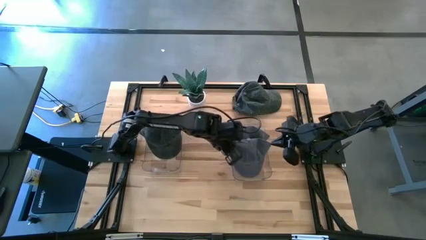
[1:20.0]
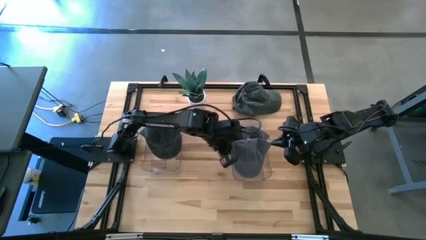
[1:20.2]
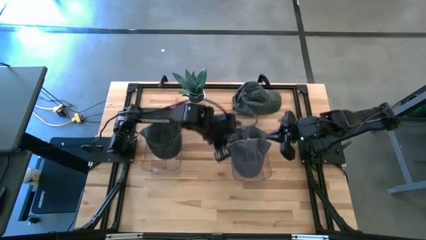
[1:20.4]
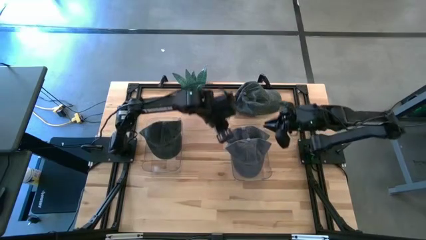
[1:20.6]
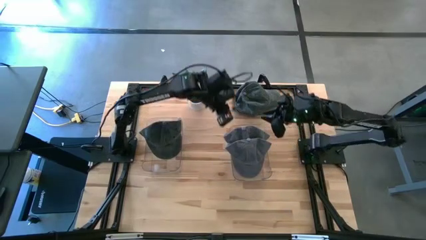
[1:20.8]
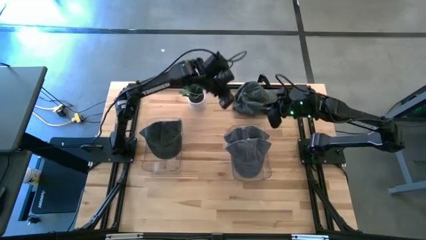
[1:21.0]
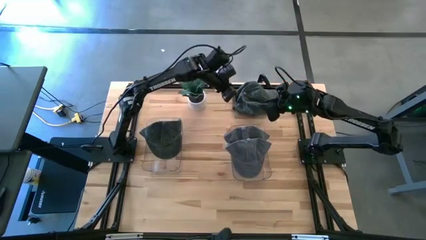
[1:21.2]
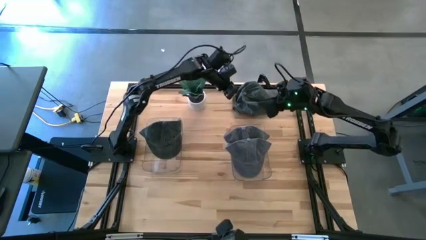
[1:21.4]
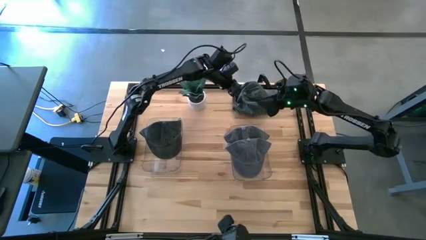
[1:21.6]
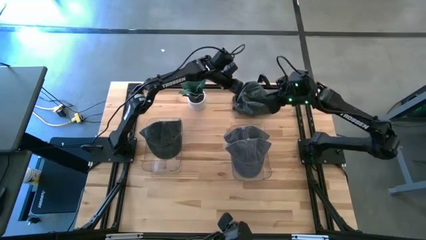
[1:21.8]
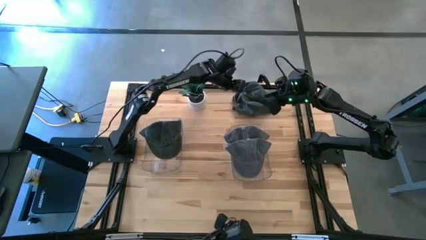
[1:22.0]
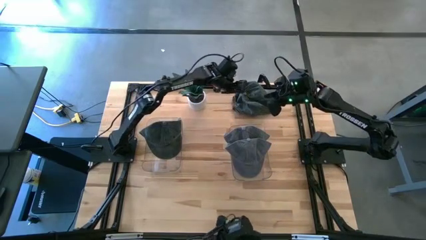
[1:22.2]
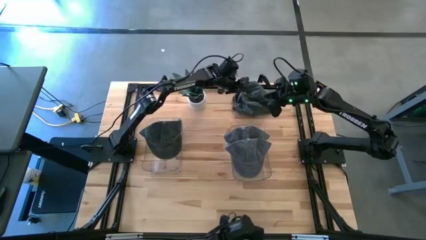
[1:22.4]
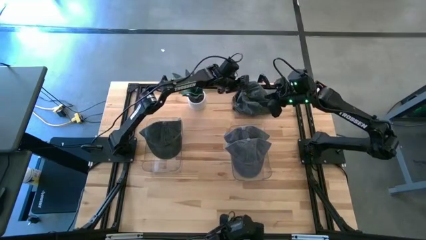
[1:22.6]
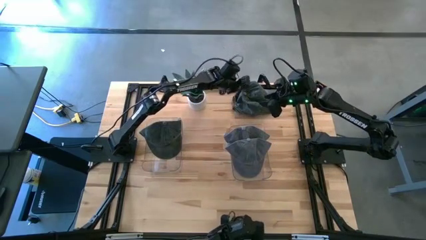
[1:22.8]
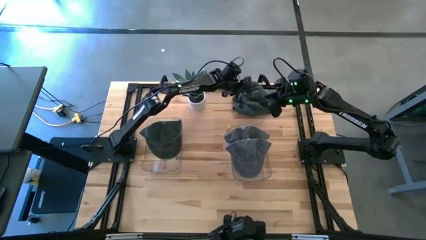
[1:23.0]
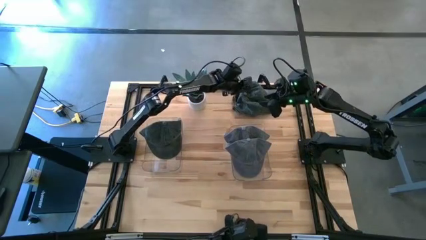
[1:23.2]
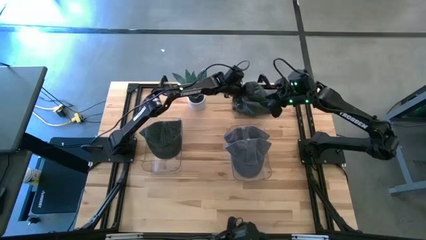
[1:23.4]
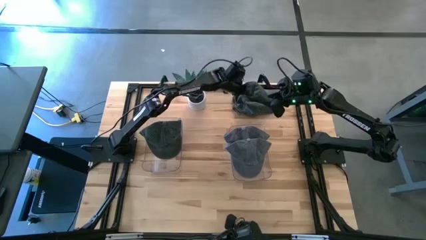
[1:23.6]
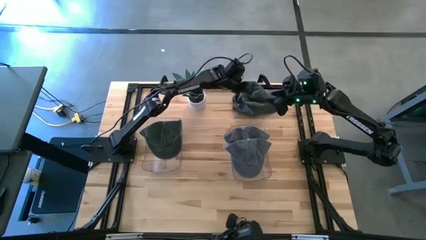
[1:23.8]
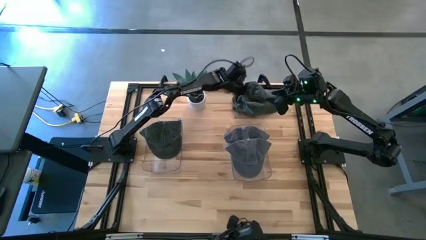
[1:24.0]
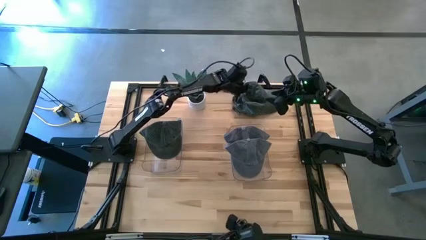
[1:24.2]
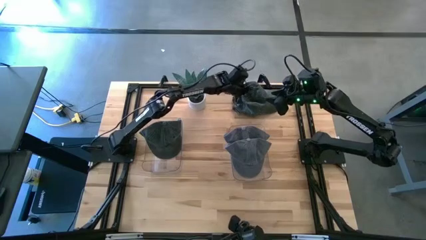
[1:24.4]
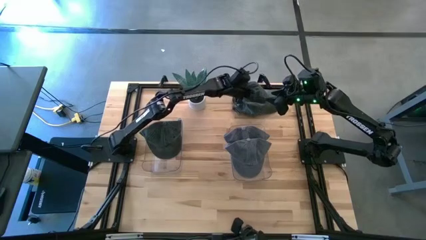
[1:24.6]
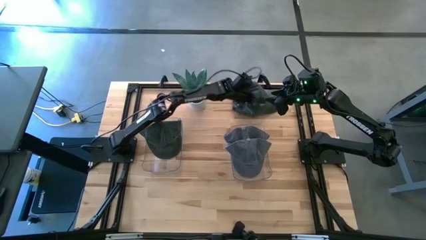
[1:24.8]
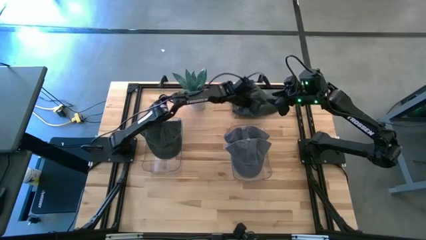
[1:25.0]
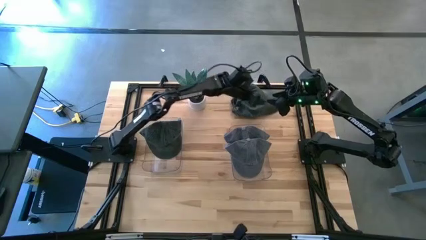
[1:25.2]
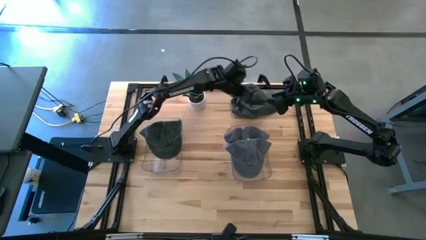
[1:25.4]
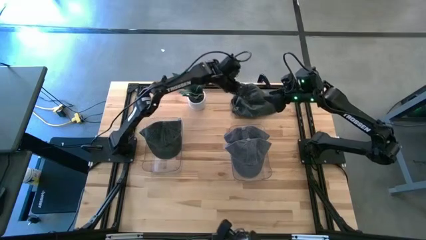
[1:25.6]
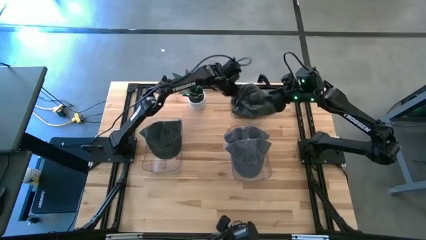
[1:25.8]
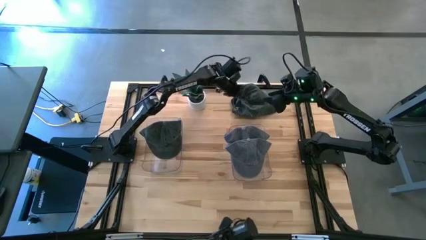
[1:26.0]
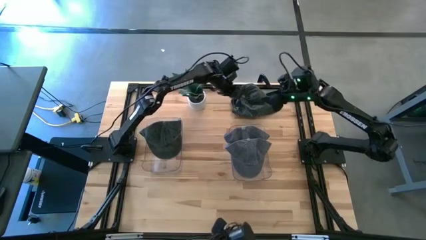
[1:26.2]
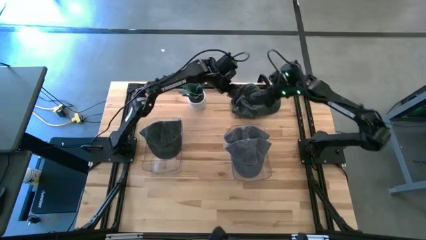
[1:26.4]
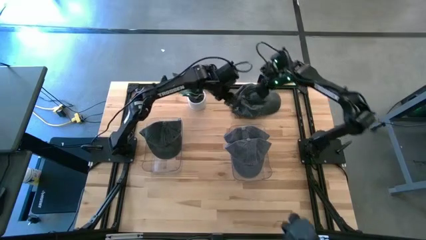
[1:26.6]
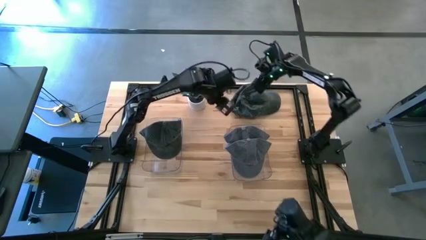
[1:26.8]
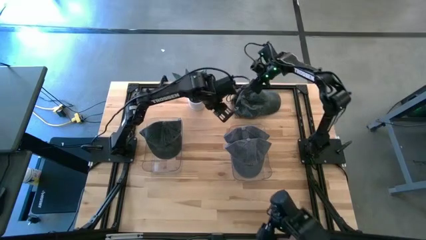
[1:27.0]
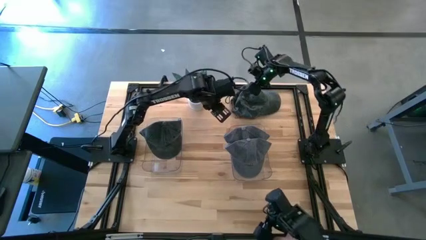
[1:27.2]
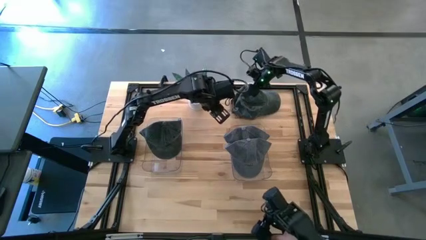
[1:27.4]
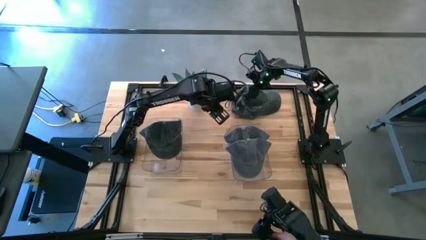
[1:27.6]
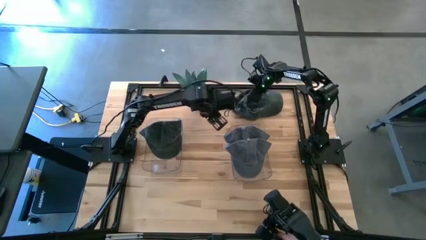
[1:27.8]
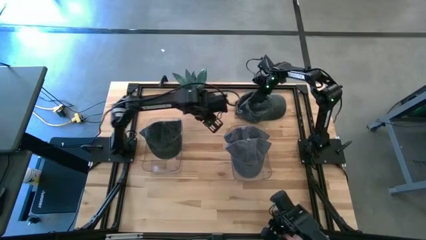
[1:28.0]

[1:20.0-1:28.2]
Task: Pick & Place hat
Put the green cap into the left transparent bin

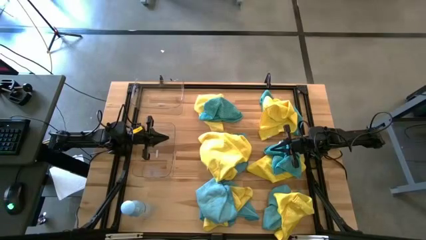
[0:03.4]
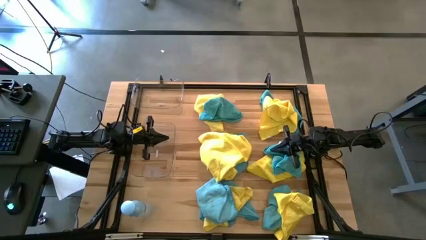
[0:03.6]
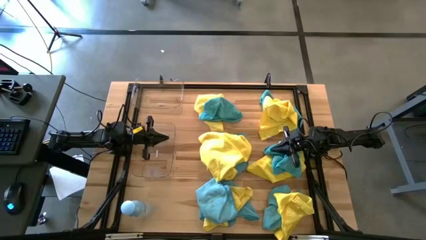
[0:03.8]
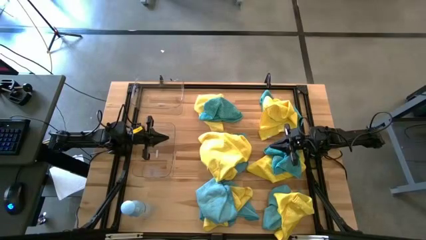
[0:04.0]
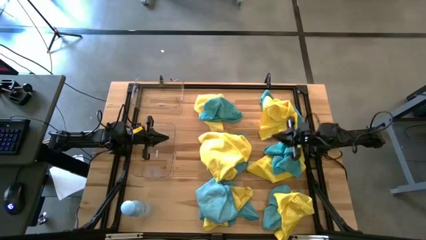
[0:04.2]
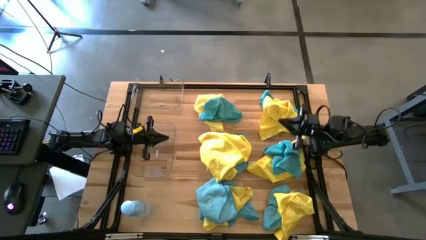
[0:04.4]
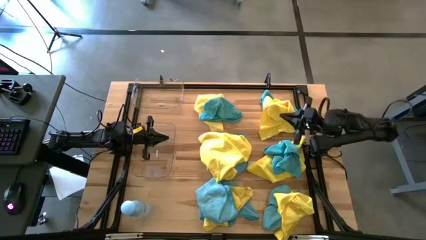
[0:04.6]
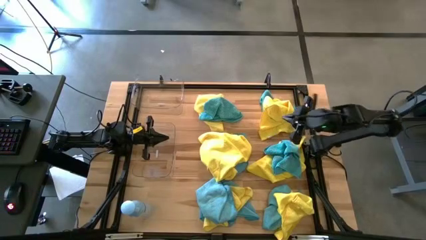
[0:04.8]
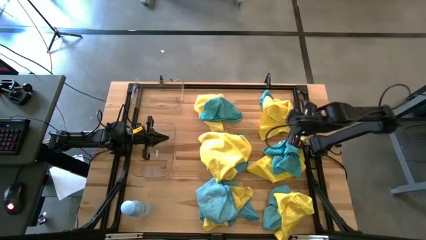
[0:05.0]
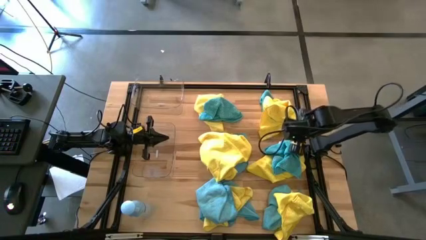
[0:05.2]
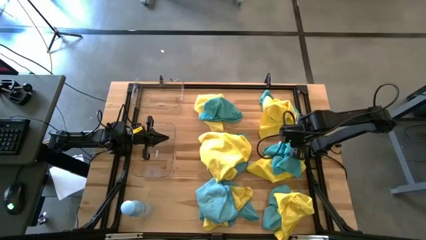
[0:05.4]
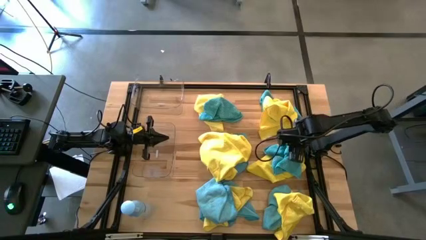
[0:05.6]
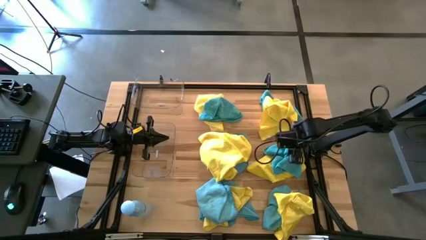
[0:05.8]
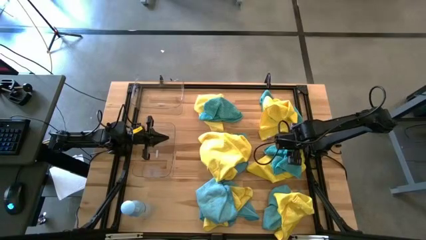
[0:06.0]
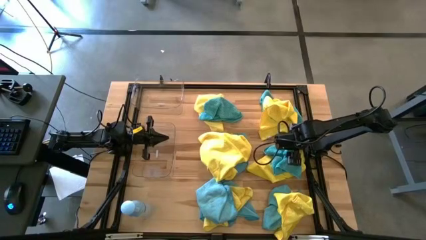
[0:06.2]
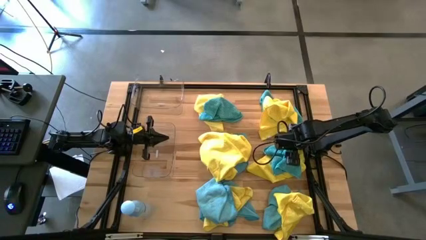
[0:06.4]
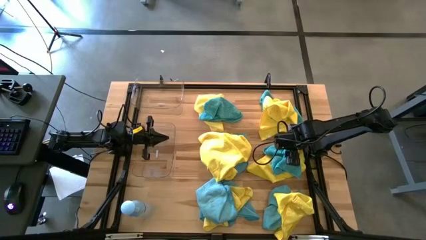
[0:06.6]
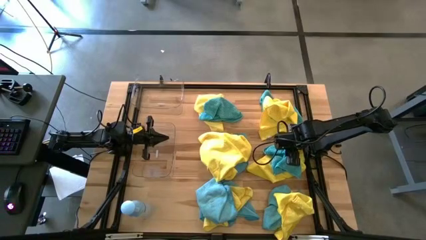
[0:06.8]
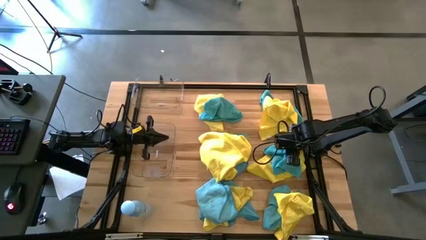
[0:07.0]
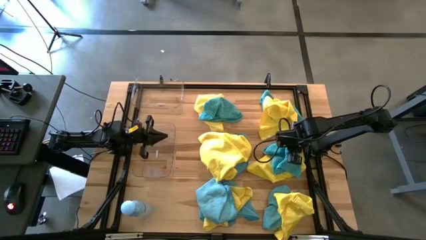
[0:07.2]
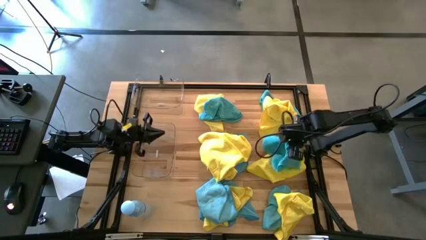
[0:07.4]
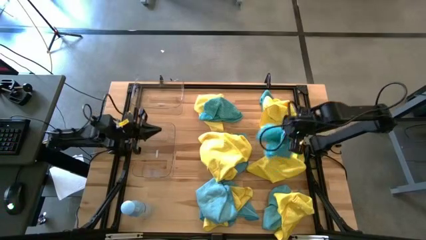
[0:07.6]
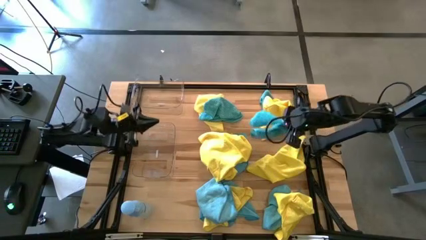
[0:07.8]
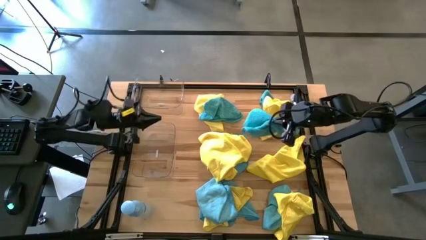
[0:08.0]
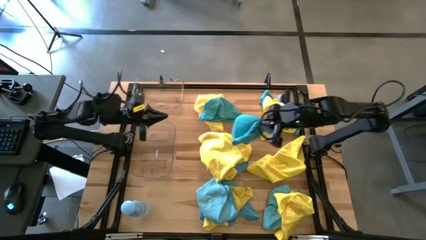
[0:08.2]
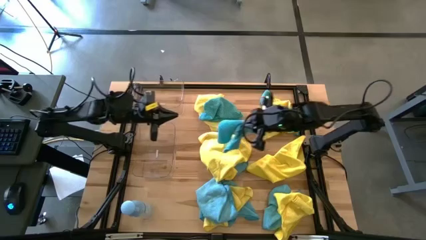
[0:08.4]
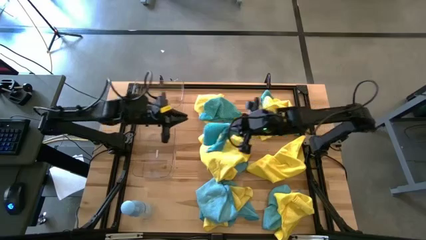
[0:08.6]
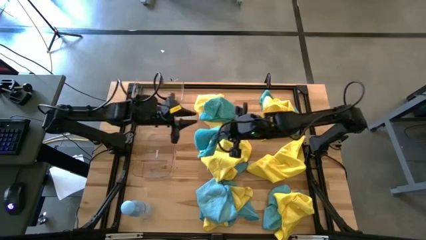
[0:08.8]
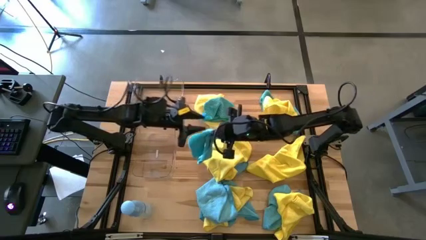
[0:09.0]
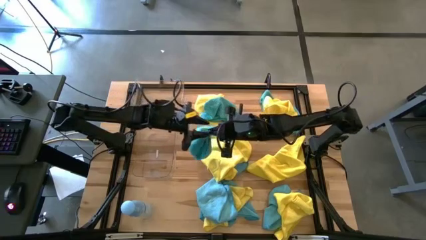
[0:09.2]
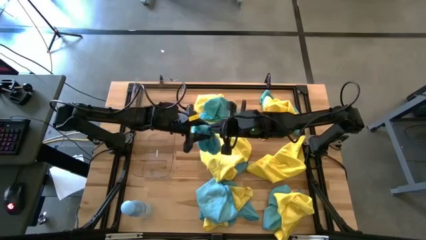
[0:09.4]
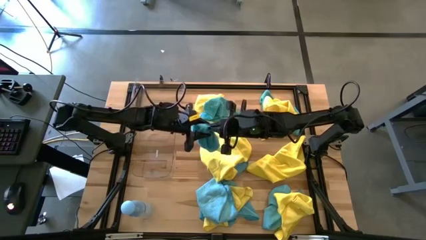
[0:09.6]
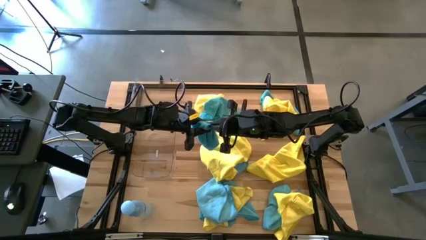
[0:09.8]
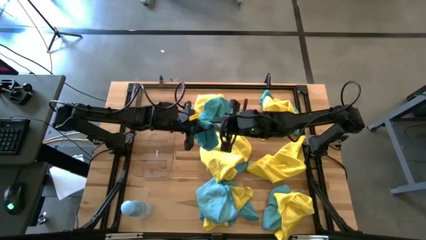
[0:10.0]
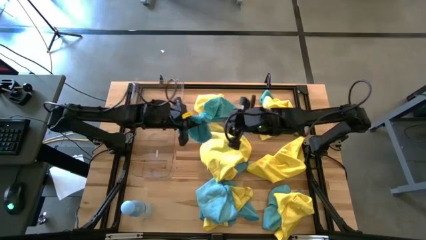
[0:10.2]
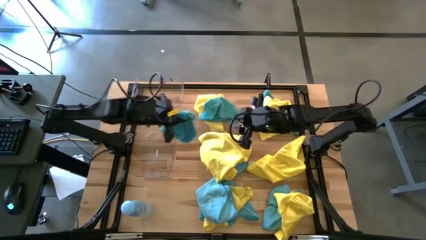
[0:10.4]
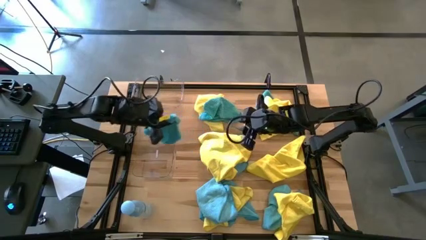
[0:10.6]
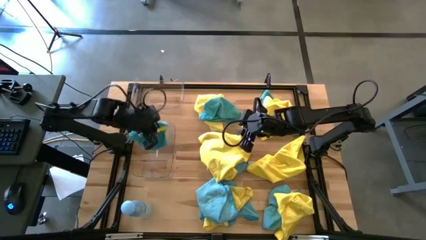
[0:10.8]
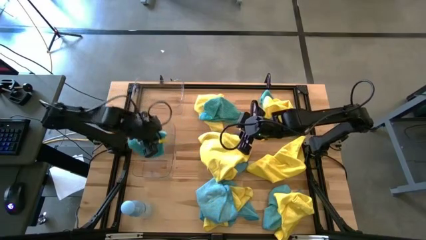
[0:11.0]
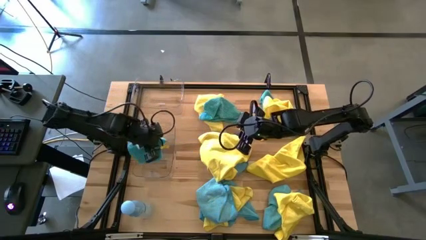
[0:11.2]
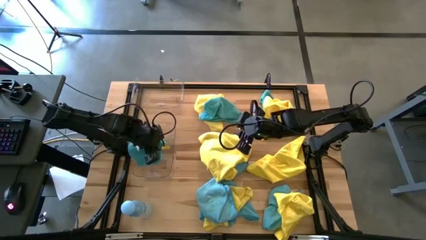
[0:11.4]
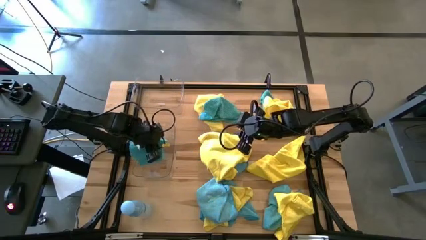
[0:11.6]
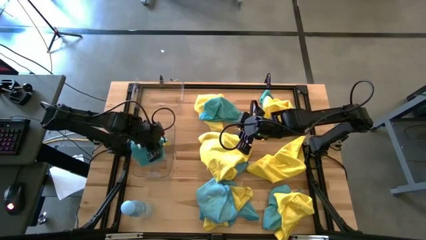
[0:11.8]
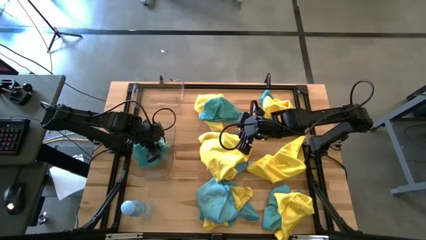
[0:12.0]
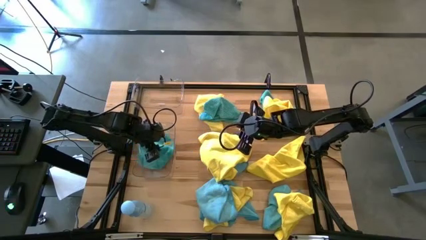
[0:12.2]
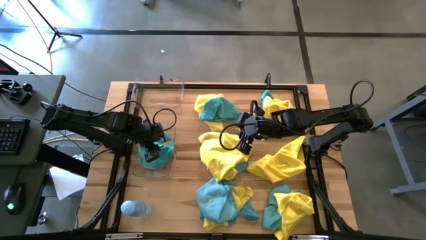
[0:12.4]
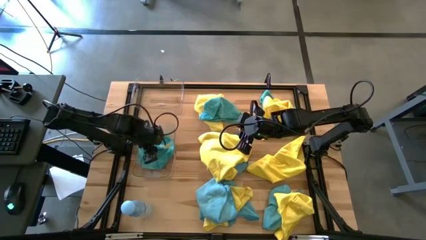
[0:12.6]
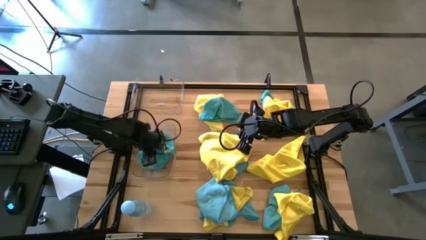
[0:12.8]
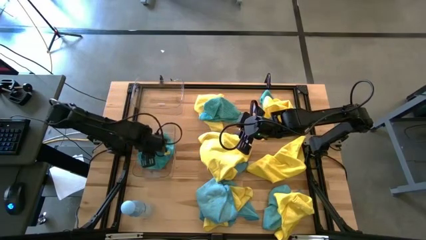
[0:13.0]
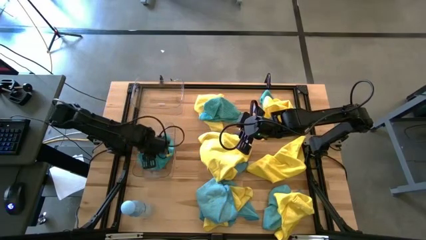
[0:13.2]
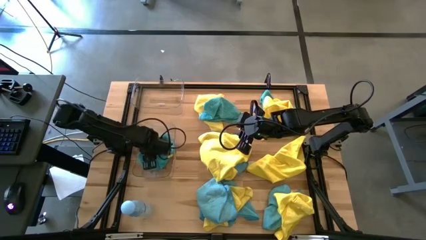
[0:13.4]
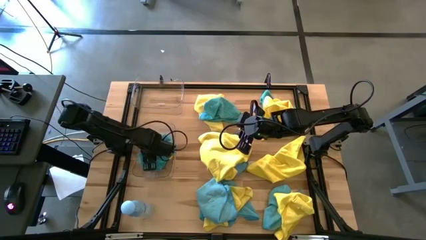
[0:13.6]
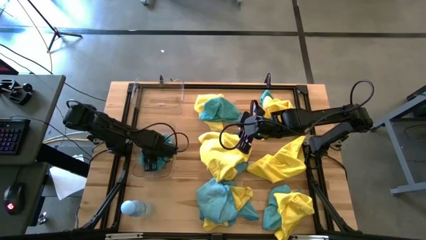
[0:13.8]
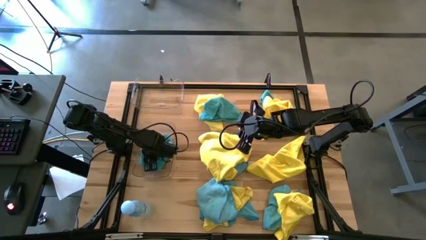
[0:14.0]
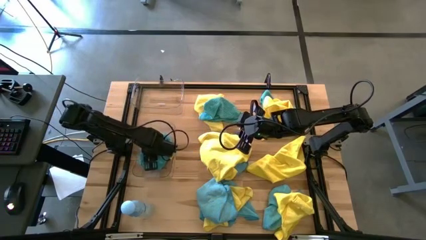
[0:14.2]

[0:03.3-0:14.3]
Task: Sort microfiber towel by color & place in baskets
Put the blue microfiber cloth into the bottom transparent bin
